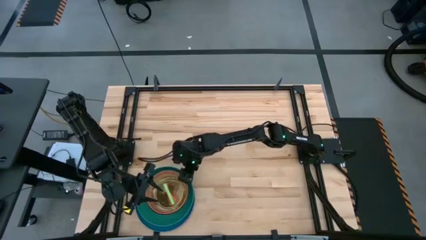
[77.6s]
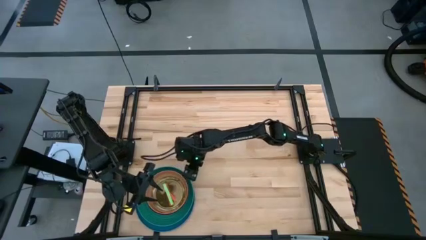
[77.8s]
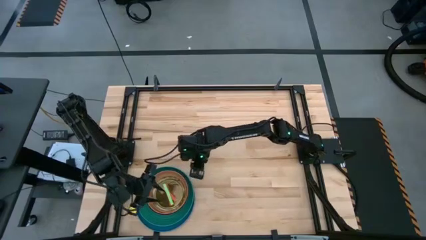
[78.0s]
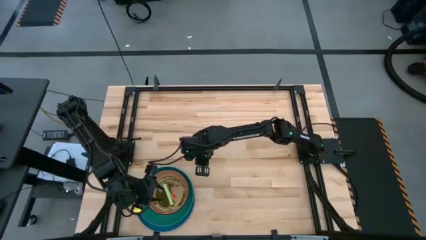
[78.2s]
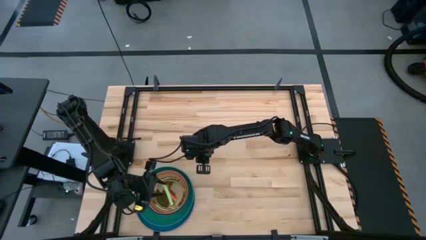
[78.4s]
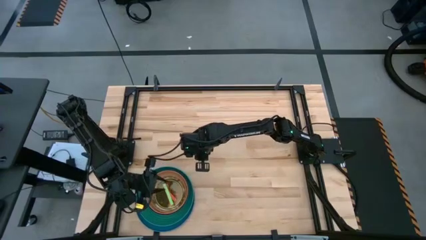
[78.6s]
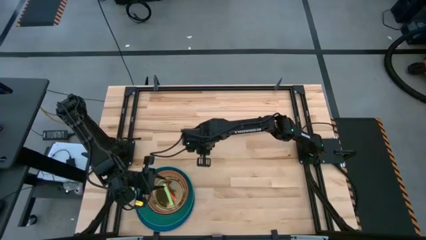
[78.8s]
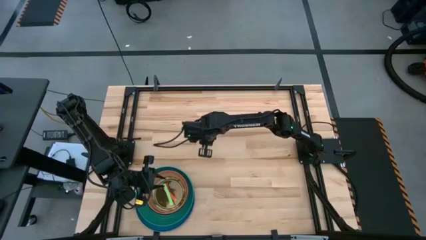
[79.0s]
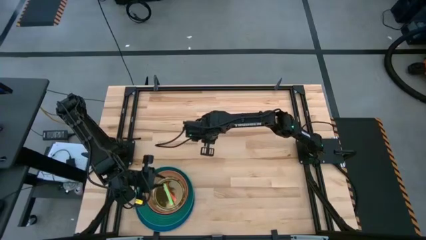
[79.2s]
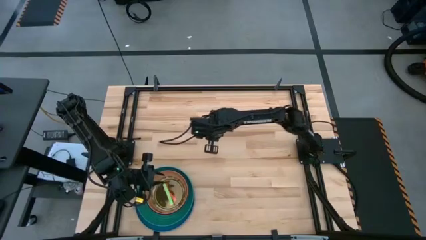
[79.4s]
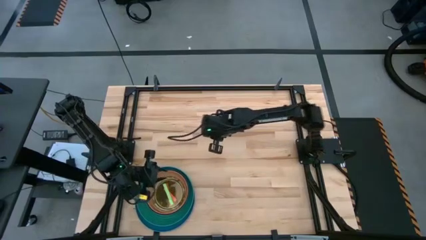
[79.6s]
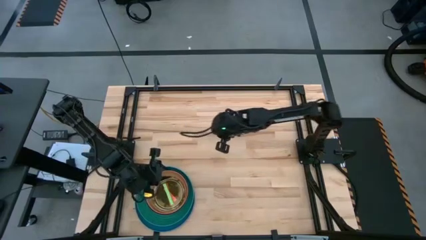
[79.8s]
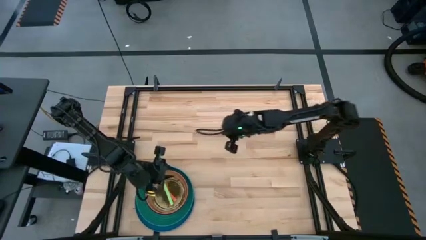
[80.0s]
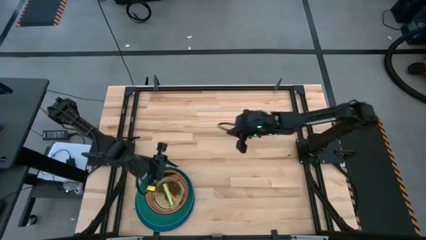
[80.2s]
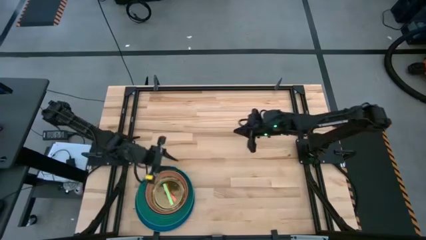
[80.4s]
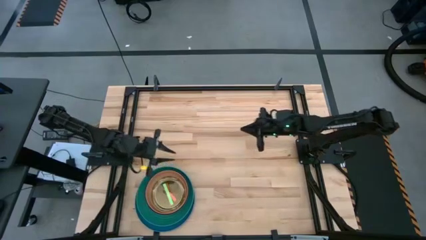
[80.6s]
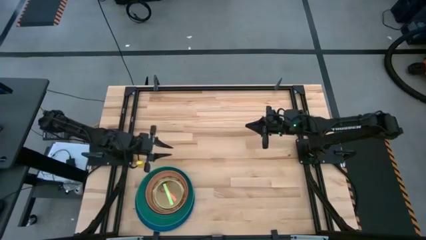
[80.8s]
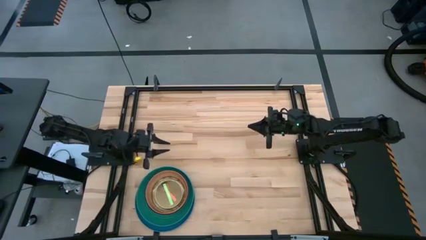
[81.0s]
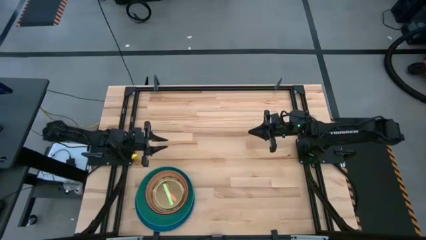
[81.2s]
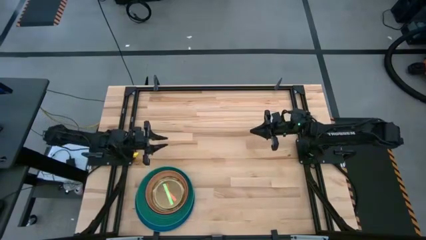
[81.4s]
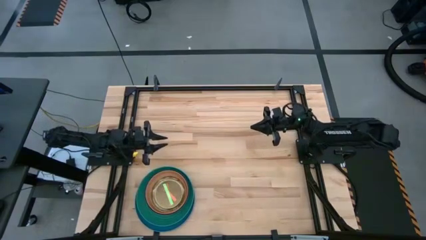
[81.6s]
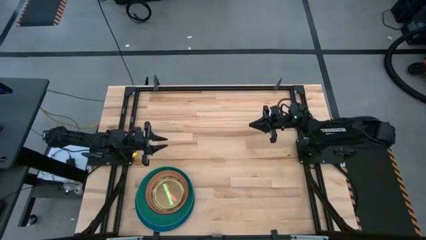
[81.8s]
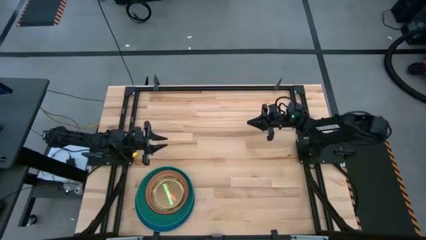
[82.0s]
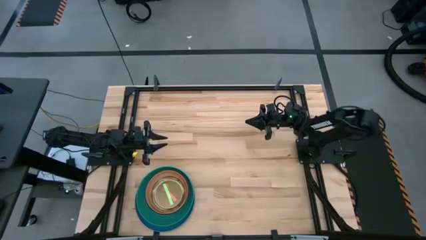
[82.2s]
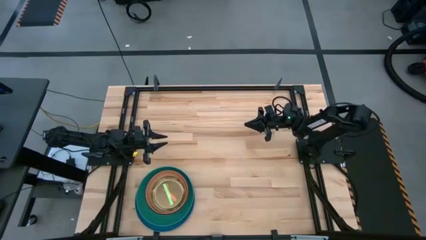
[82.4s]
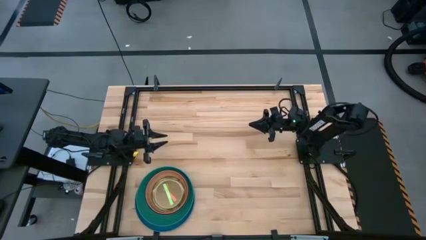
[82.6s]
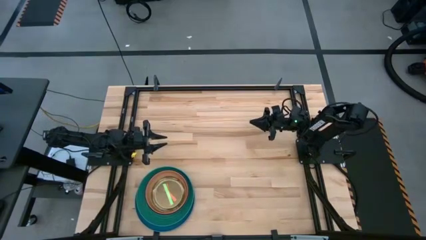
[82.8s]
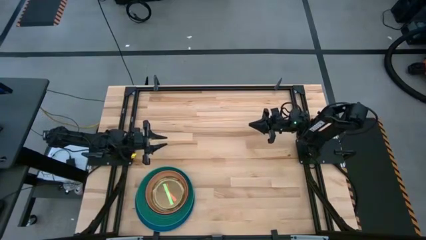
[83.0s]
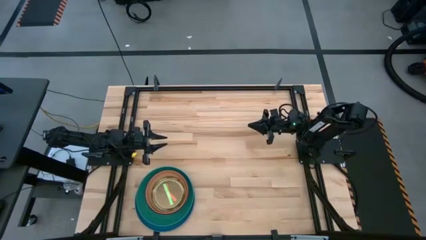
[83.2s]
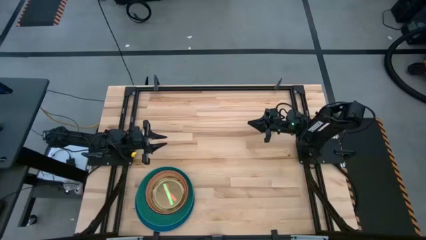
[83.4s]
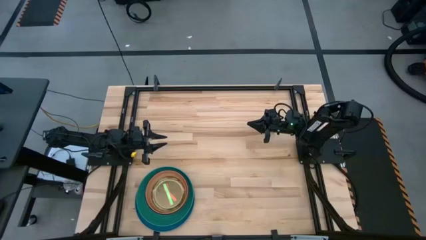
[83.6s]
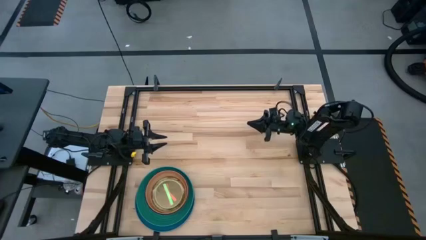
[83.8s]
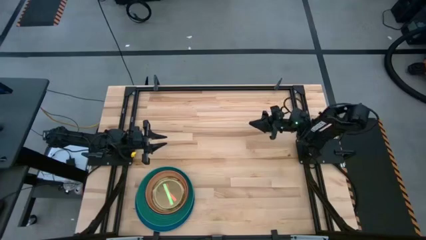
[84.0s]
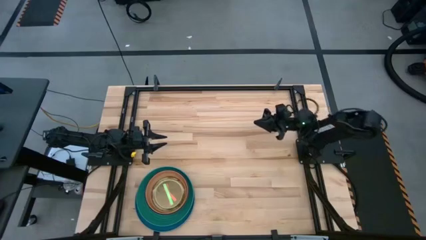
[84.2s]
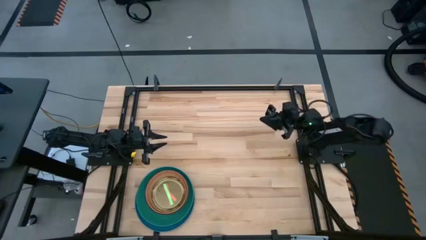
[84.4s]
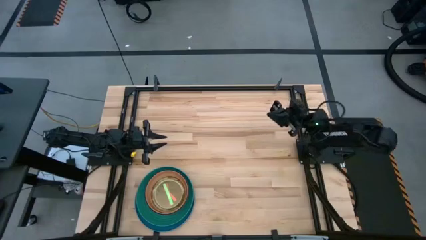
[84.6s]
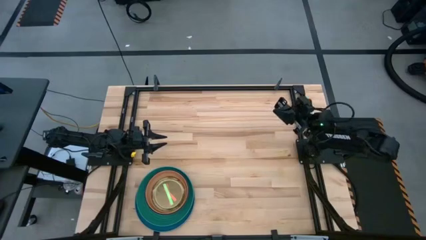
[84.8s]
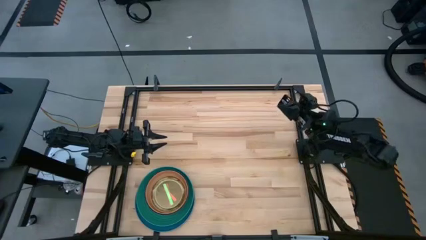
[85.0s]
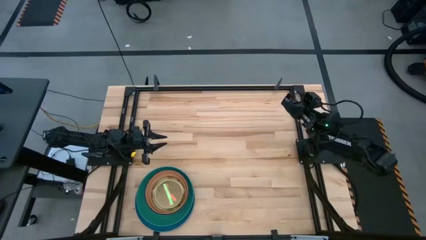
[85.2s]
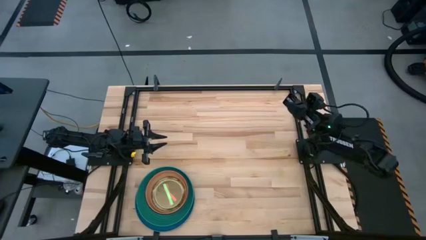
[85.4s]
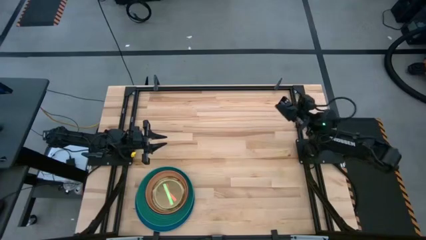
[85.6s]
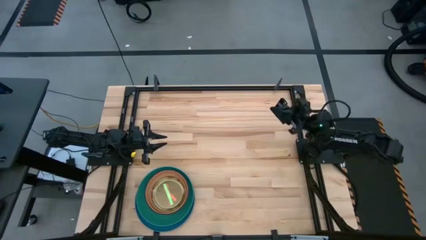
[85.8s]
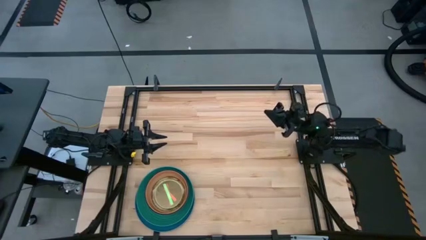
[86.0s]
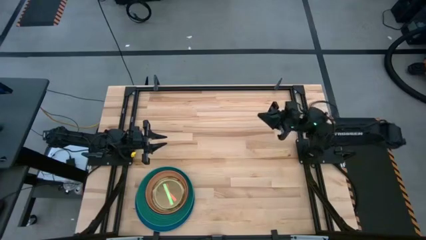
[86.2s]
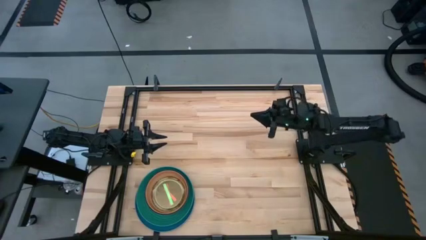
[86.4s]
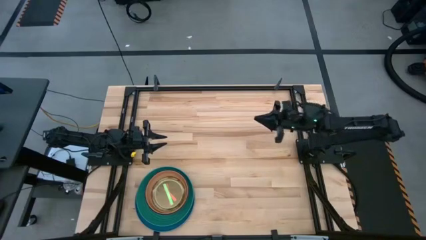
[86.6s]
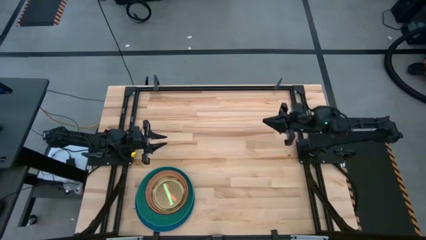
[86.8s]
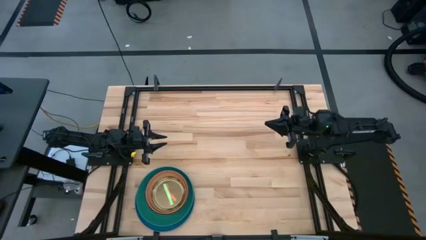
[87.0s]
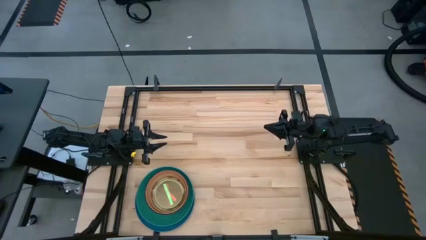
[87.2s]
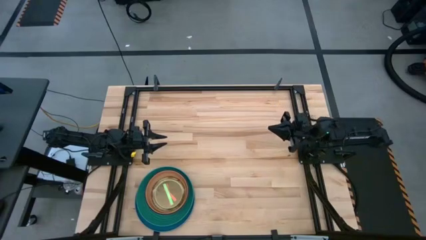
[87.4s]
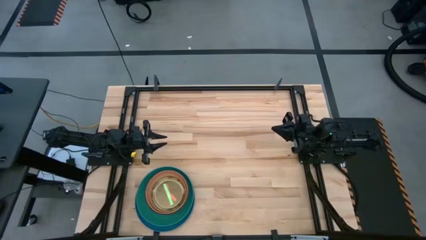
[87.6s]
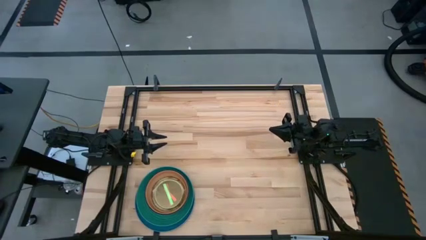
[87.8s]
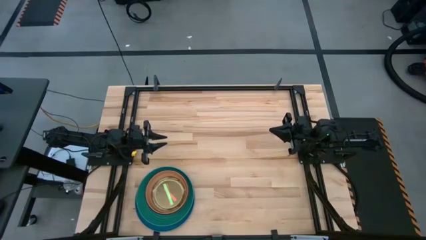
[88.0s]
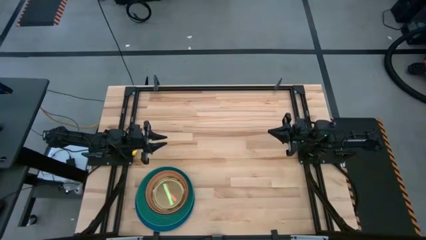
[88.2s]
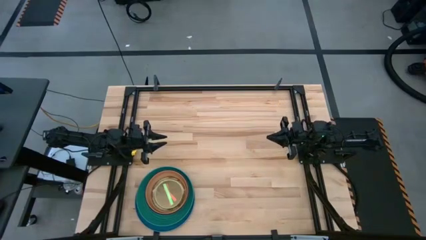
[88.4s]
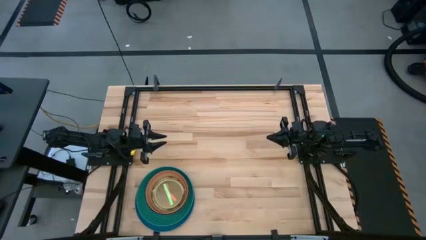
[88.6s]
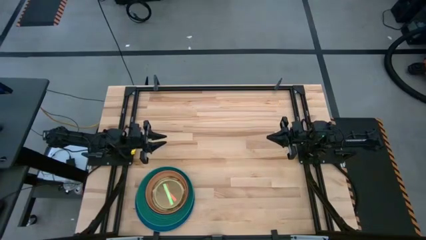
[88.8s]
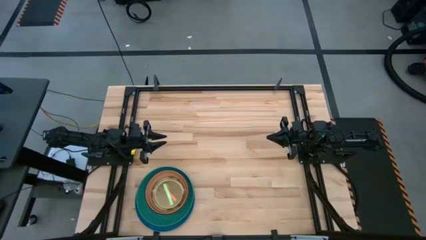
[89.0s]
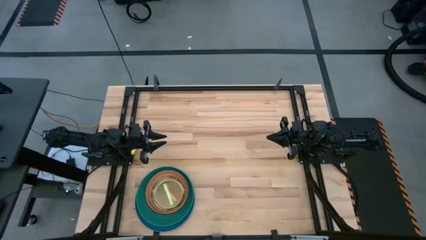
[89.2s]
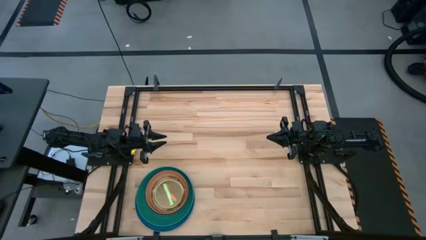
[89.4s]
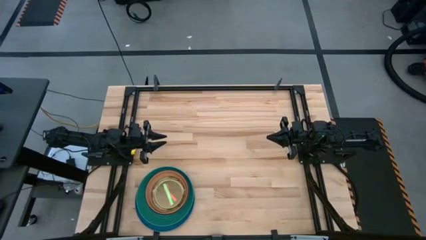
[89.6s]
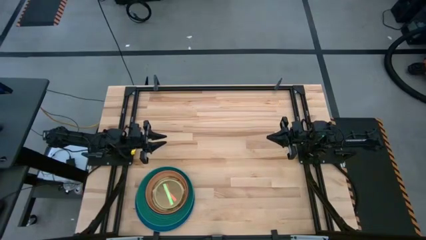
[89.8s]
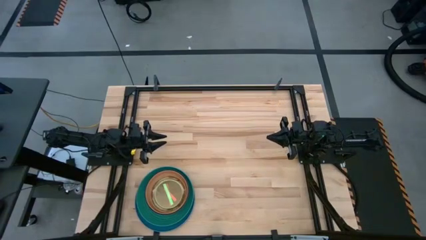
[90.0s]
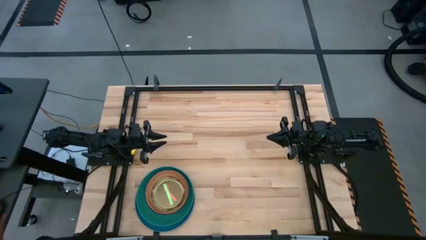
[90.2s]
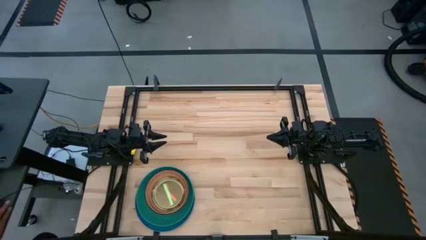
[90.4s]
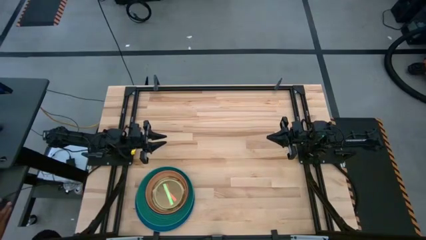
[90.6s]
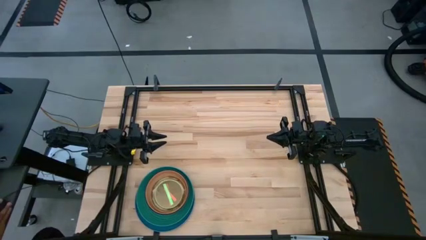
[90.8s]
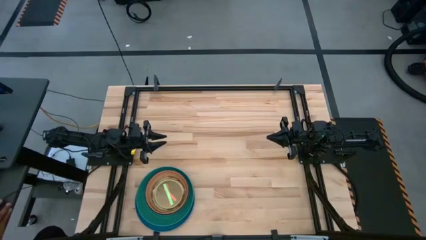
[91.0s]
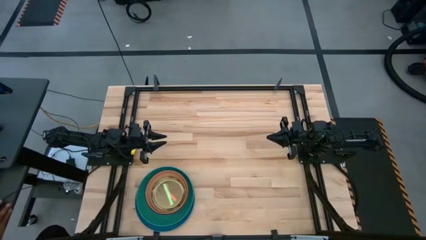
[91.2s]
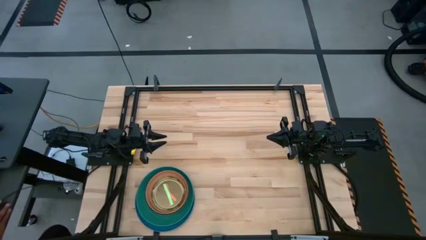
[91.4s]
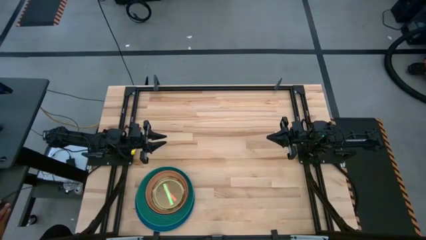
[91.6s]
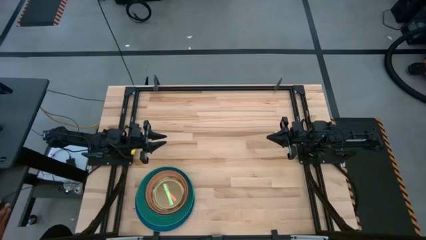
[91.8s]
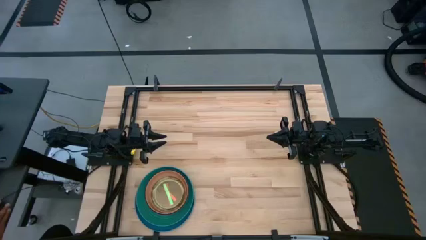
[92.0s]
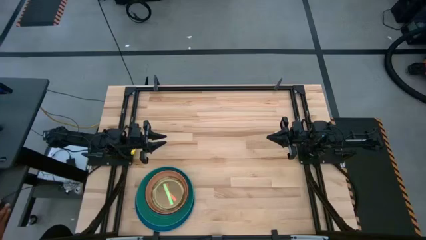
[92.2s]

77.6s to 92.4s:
Task: Stack plastic plates
Return to Home Position

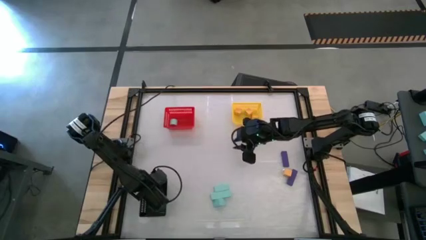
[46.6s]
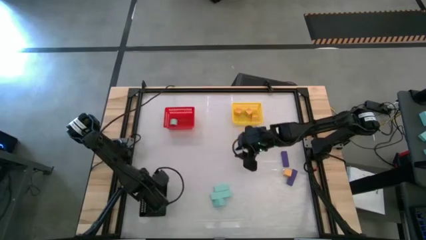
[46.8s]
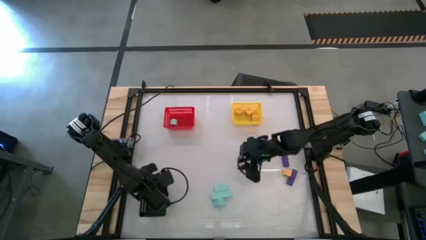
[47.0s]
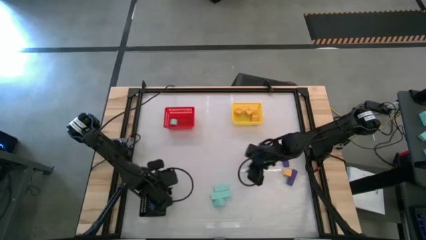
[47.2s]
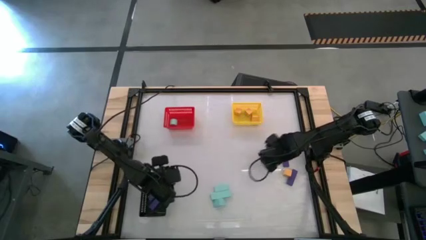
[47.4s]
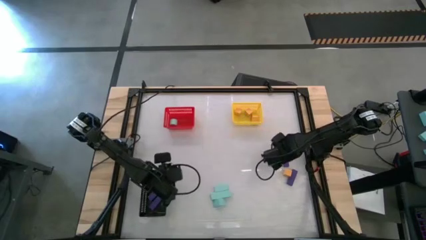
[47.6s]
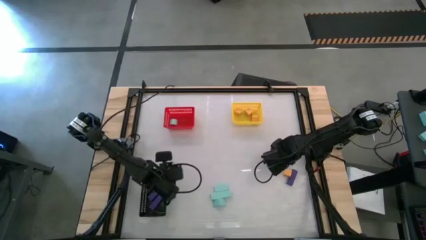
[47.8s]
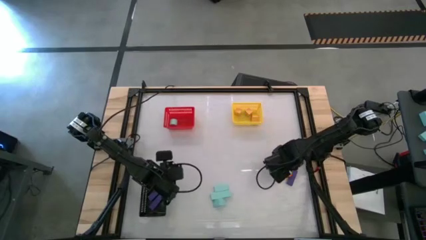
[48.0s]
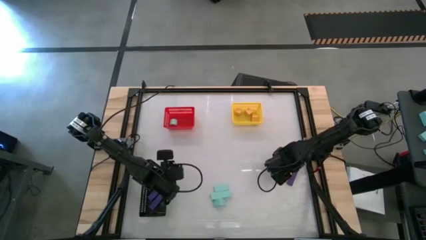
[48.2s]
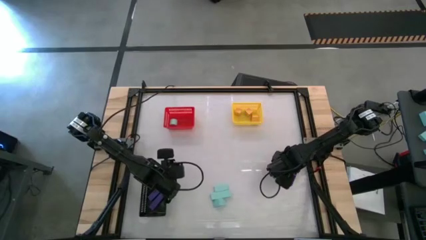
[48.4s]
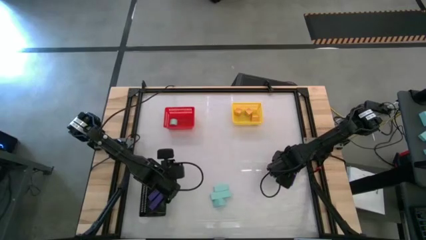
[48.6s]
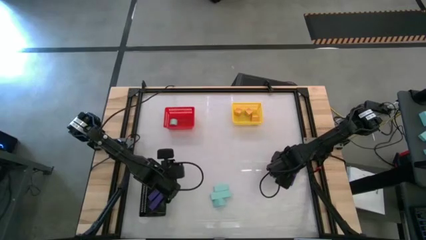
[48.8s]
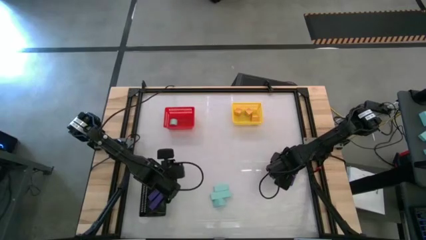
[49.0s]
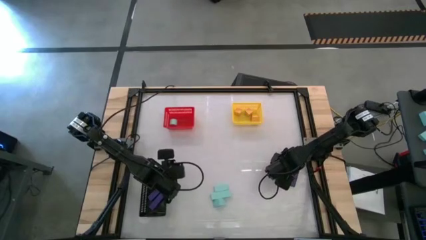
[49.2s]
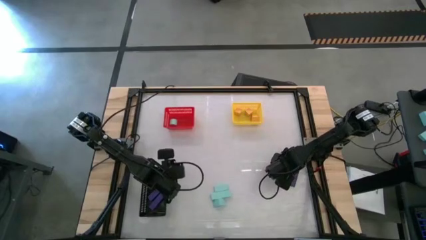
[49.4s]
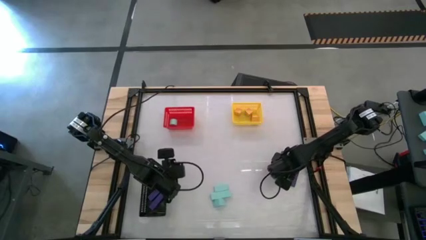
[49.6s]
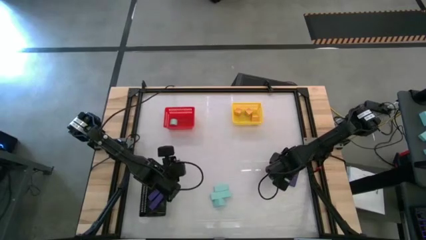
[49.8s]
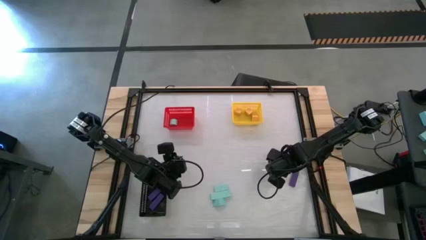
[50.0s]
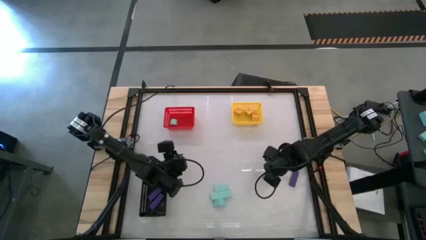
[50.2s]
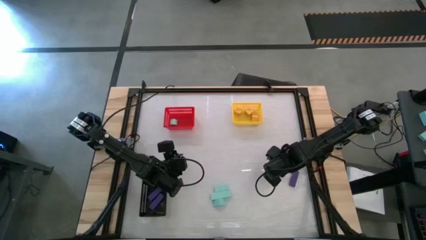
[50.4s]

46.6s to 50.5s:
Task: Sort & place blocks by color
Put the yellow block into the yellow bin
